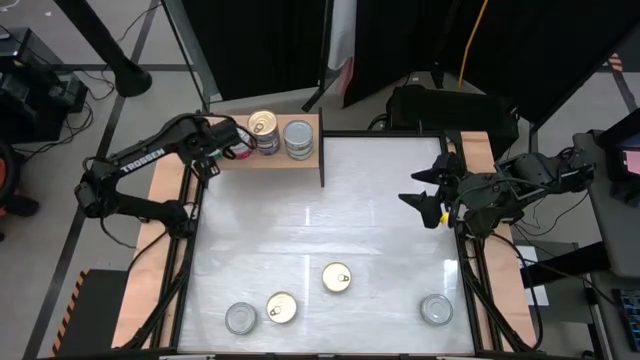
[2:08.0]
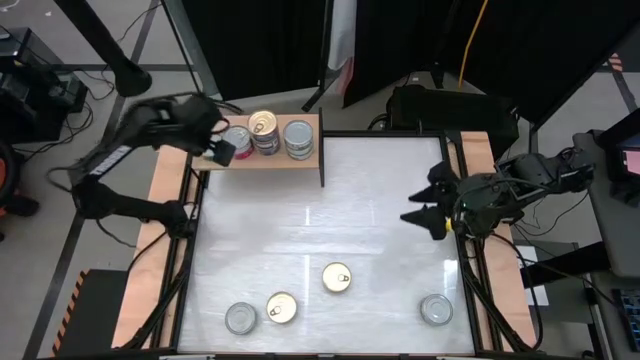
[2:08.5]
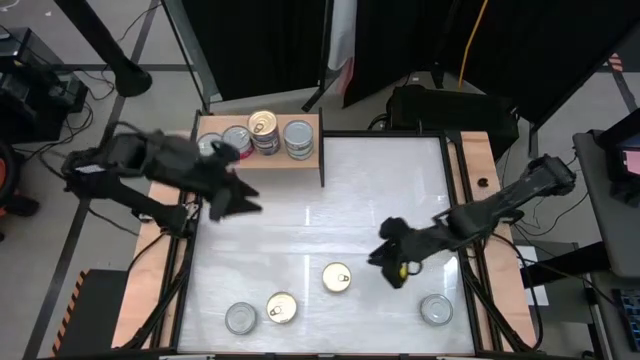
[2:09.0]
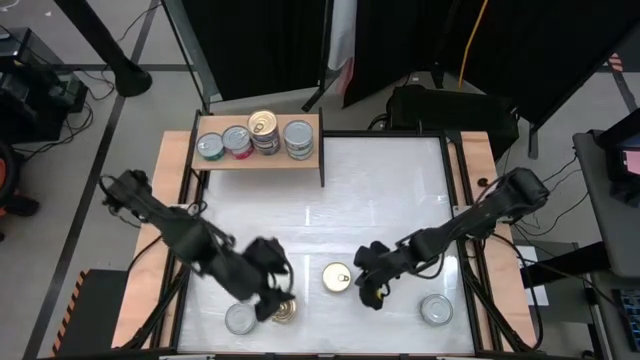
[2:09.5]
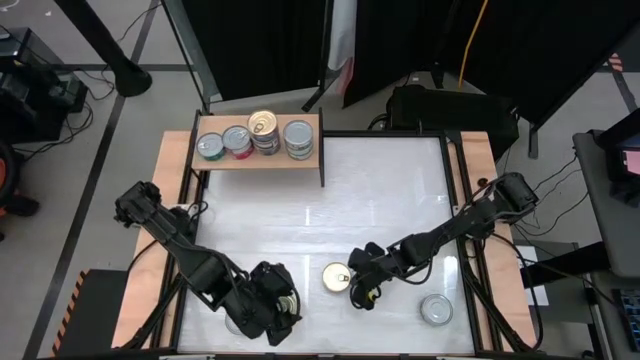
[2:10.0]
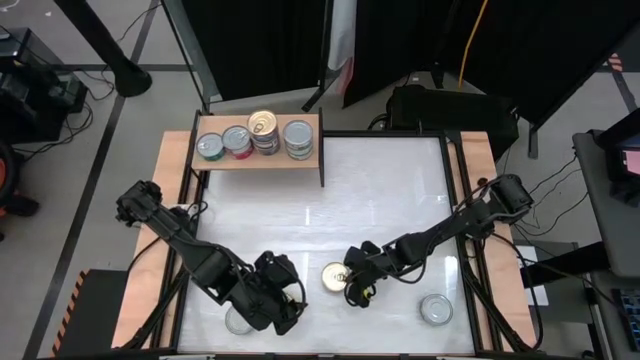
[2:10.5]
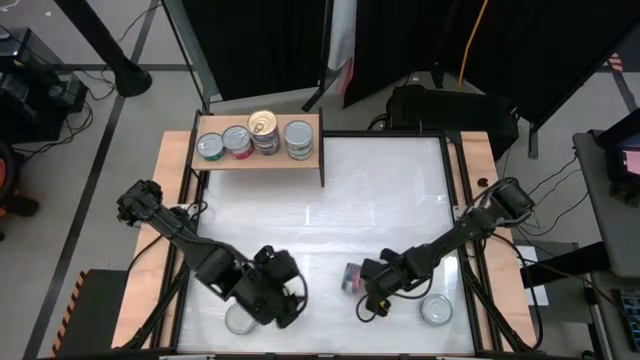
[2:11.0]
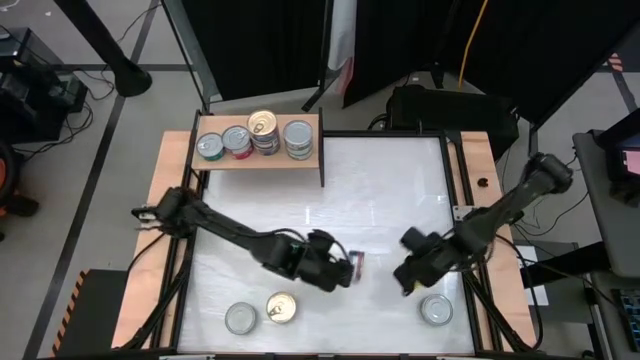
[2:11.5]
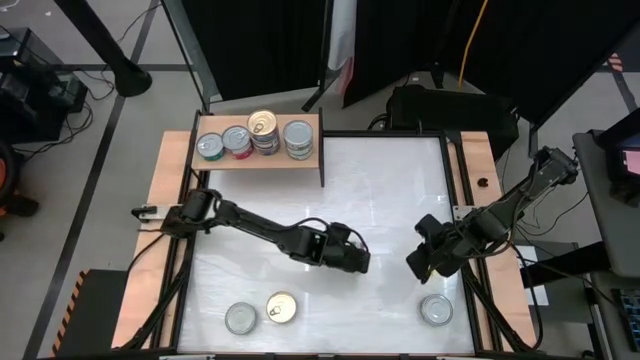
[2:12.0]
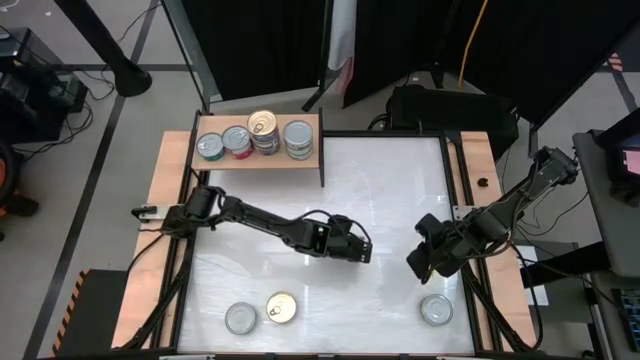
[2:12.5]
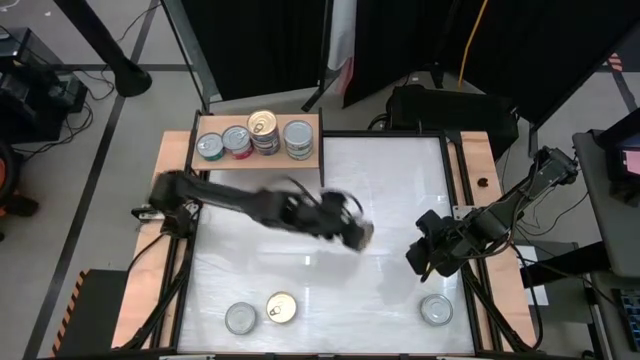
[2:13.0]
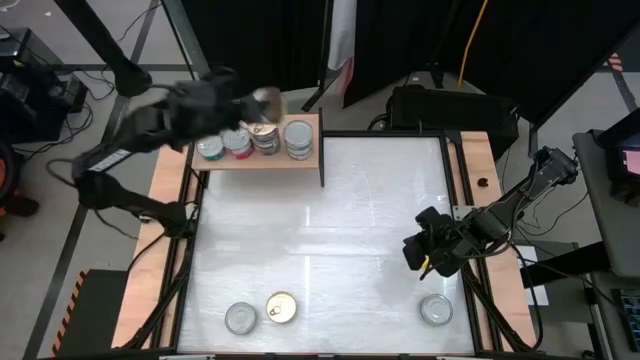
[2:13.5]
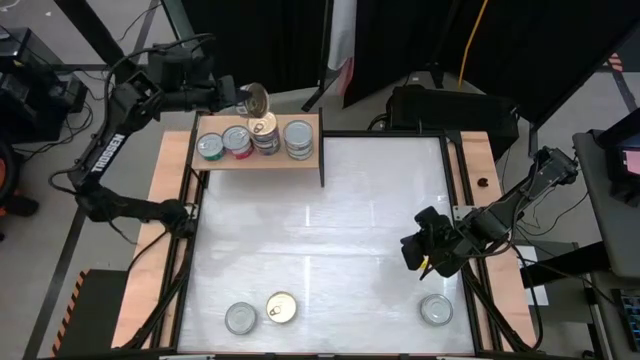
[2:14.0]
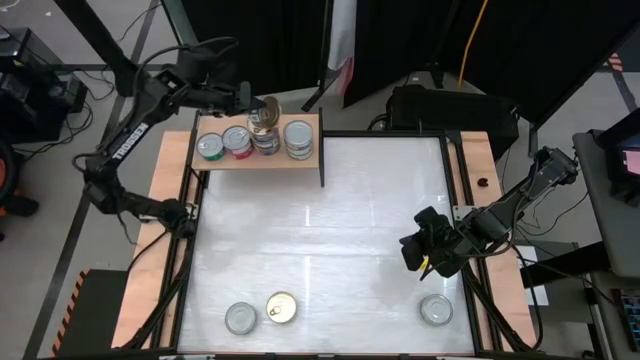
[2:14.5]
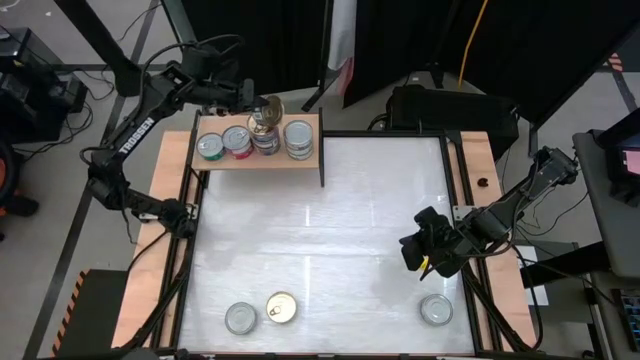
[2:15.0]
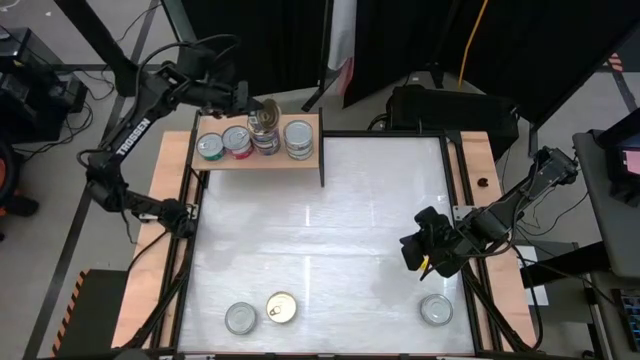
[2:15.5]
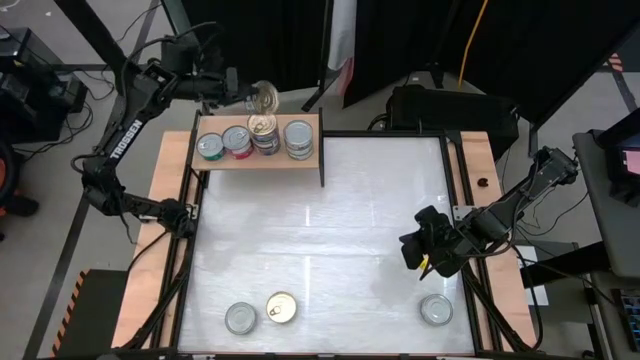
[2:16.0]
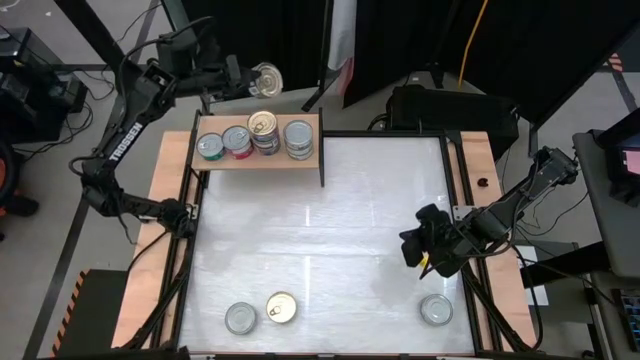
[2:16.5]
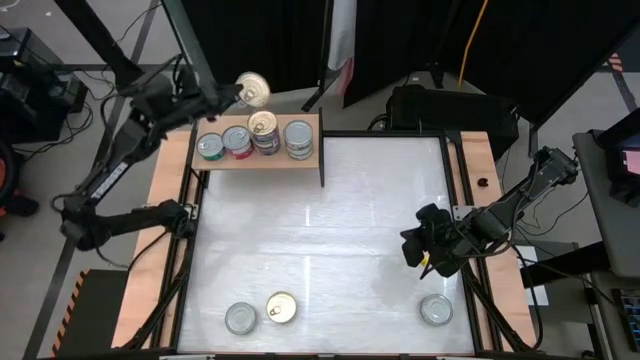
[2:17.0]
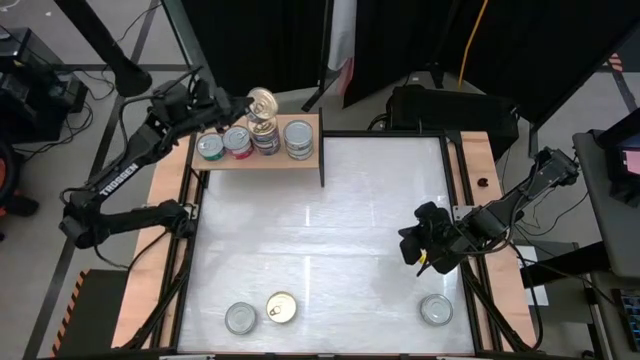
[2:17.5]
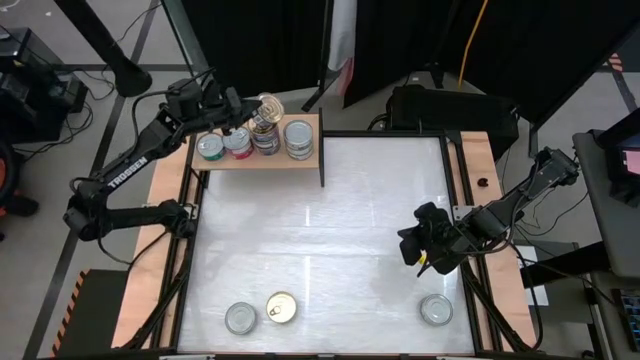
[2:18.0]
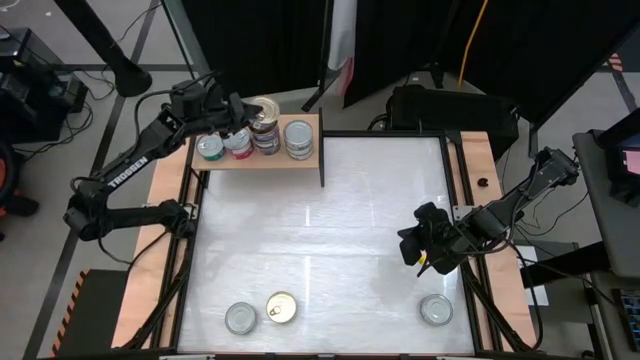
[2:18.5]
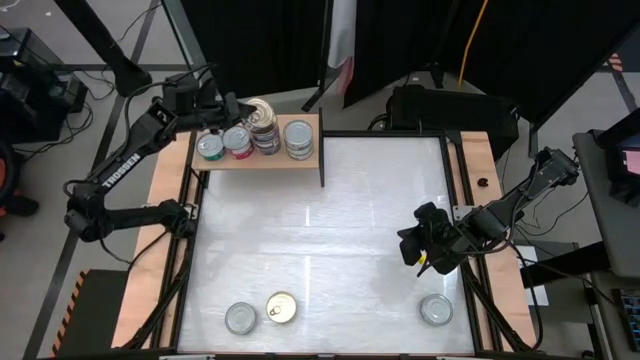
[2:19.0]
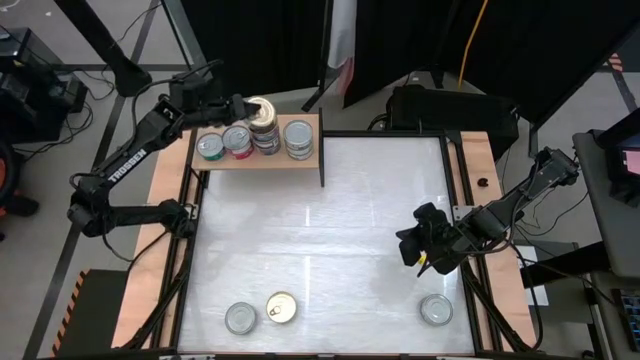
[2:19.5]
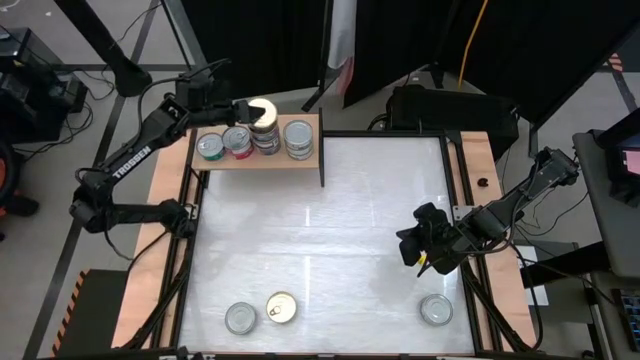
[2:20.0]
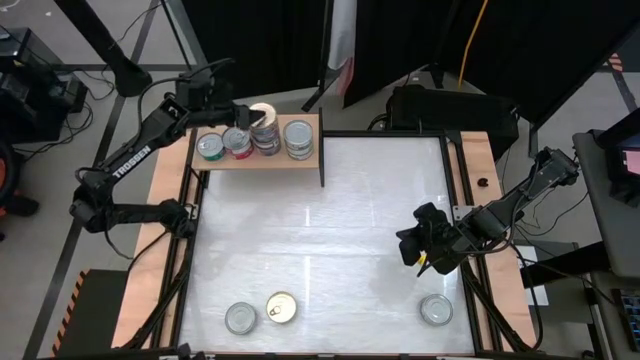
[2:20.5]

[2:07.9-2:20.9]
Task: Stack canned seafood by type on shelf
Stack the blue pink tuna can on top of the blue pink tuna cans on the shelf

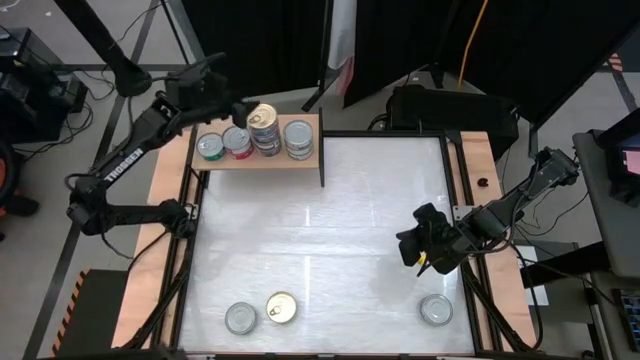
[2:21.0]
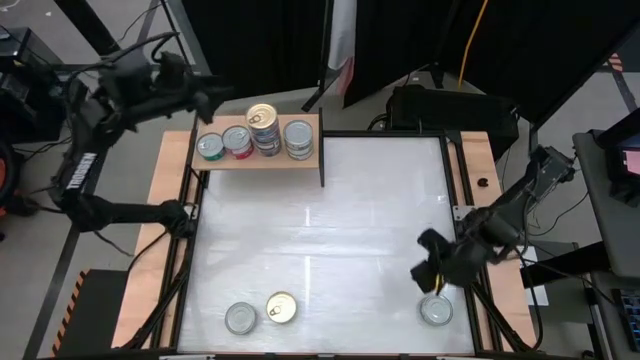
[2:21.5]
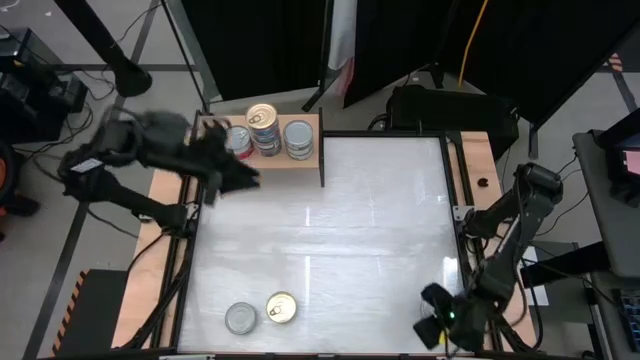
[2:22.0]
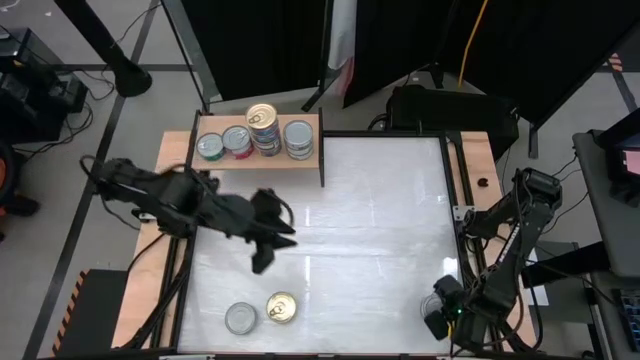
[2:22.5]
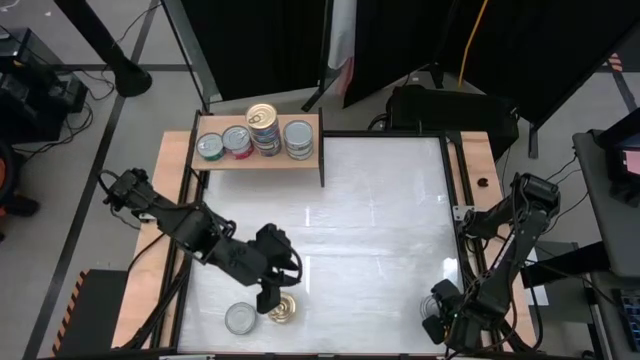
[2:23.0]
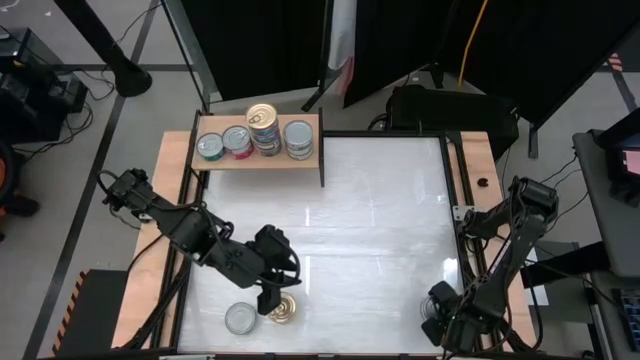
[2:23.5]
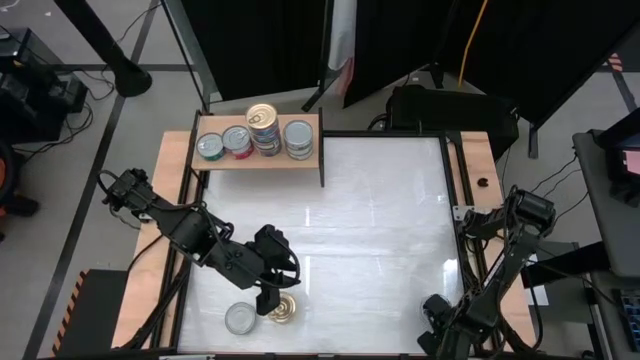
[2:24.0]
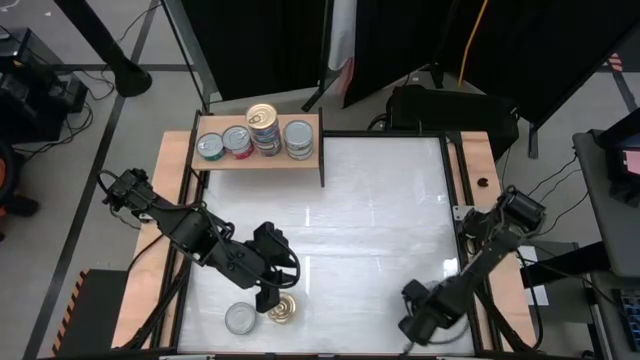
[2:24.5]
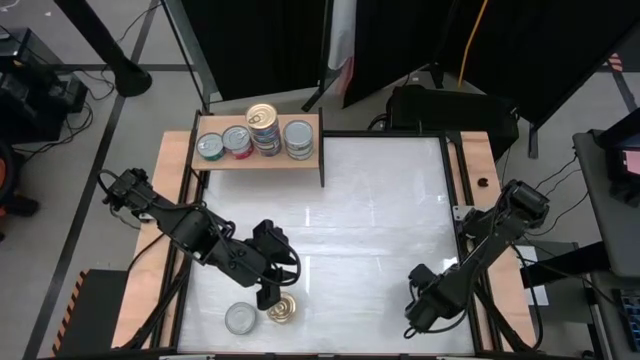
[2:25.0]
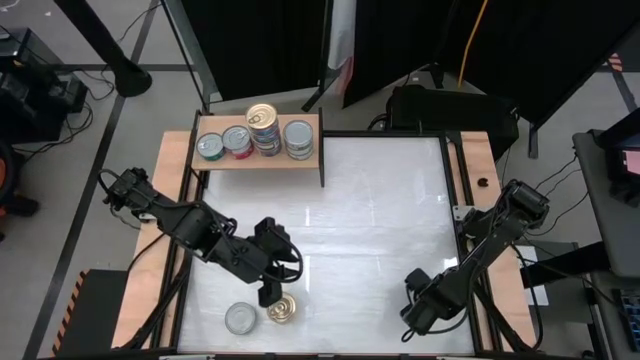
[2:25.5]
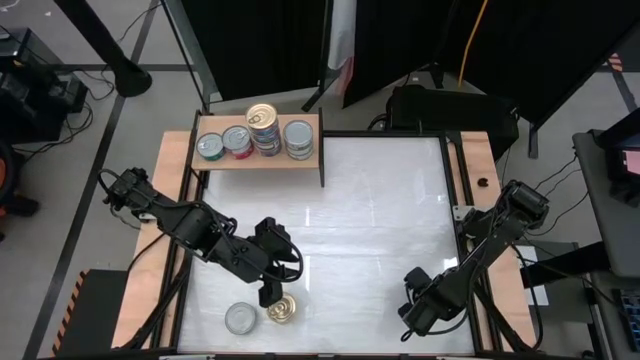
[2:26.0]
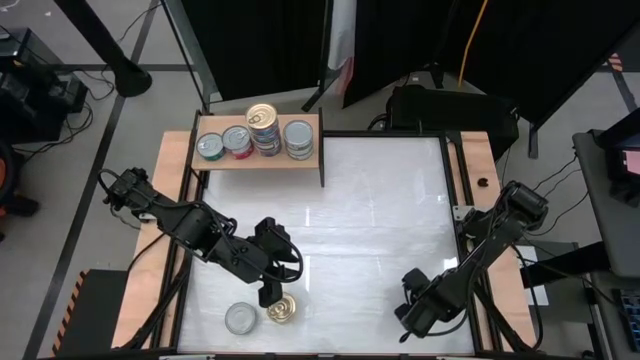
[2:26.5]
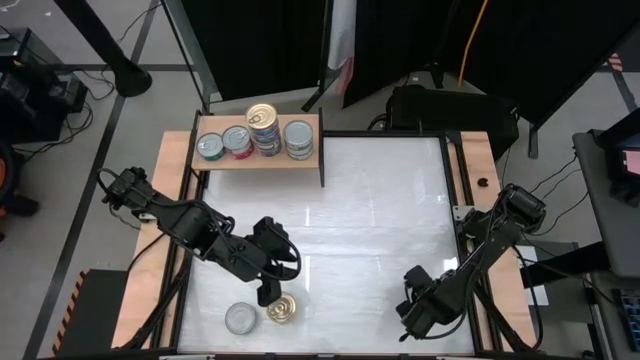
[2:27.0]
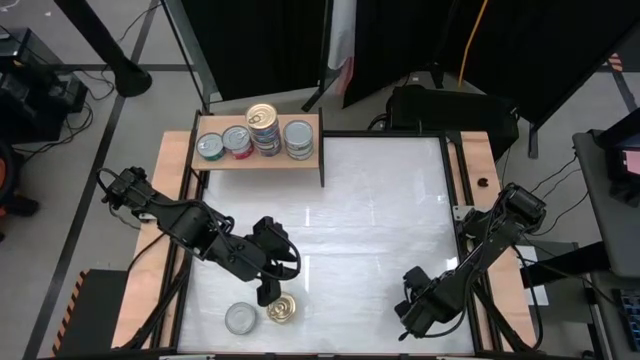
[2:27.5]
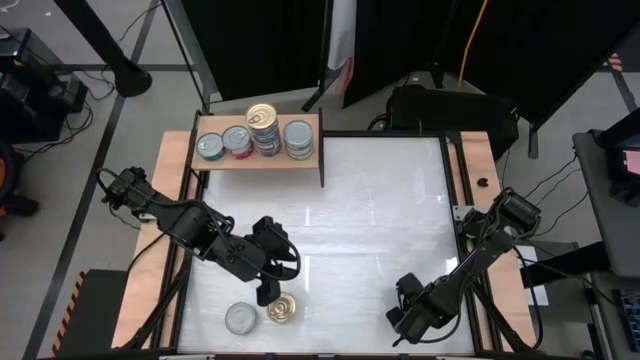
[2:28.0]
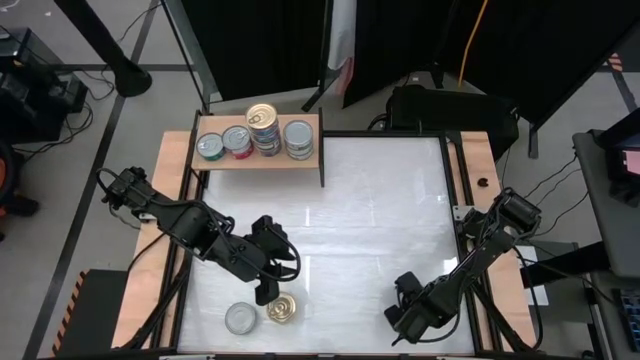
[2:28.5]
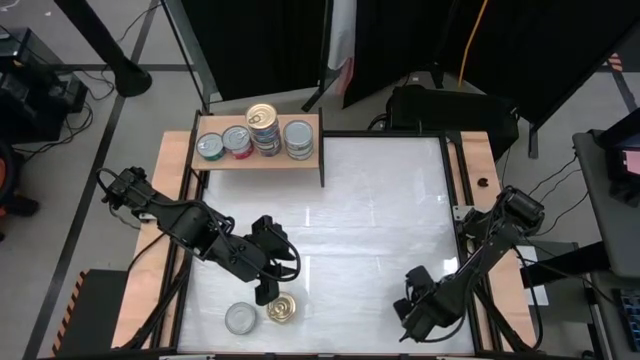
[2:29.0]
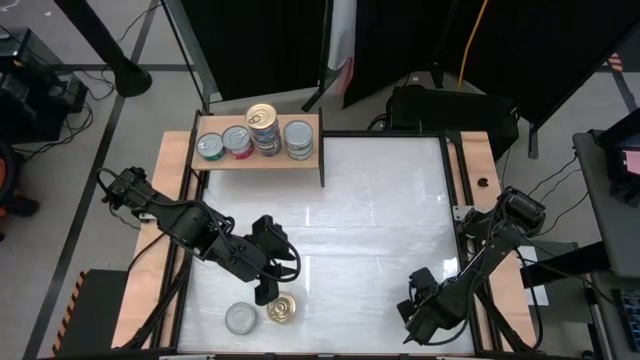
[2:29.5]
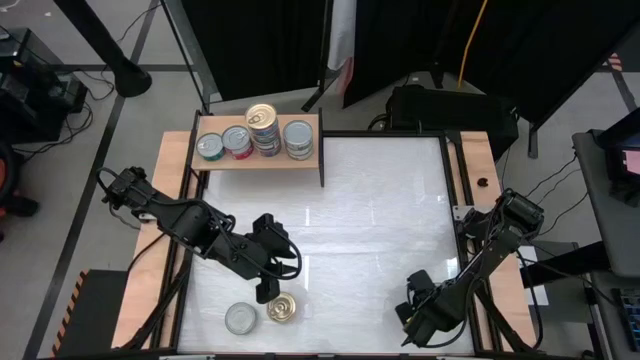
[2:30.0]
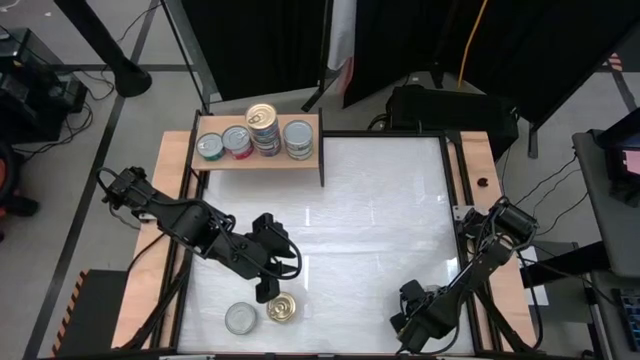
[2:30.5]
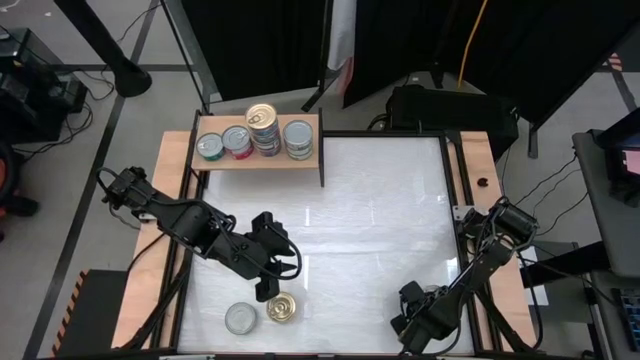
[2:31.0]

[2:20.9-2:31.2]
Stack the green white tuna can on top of the green white tuna cans on the shelf
